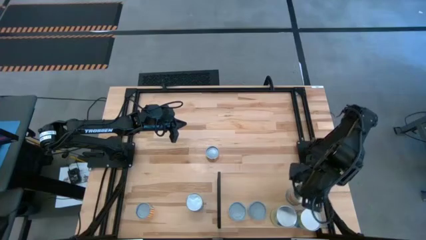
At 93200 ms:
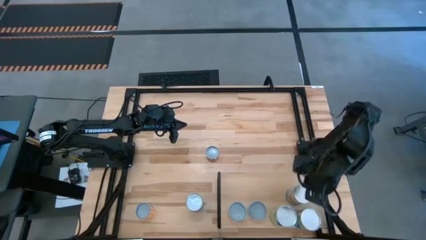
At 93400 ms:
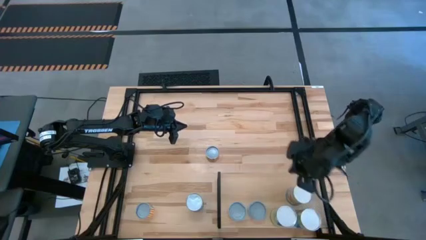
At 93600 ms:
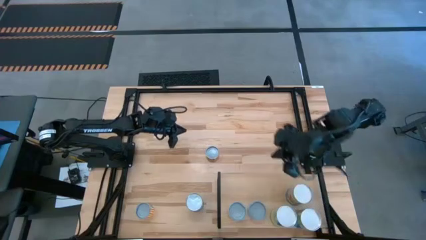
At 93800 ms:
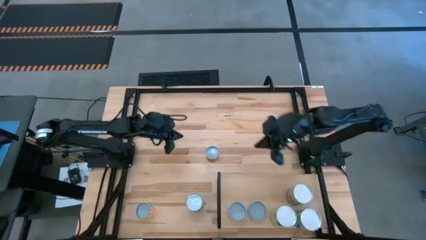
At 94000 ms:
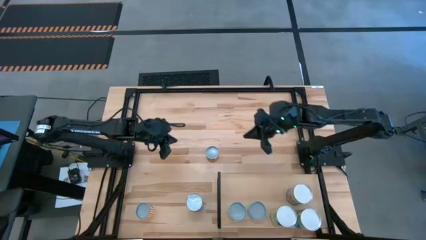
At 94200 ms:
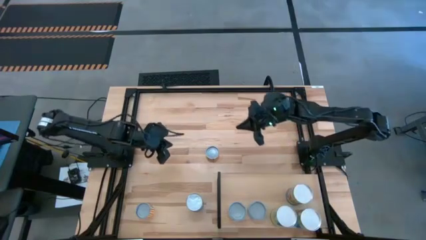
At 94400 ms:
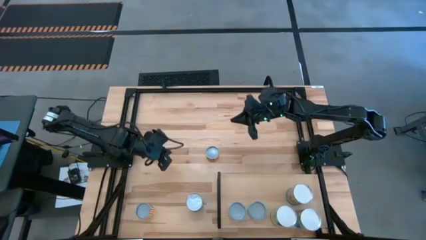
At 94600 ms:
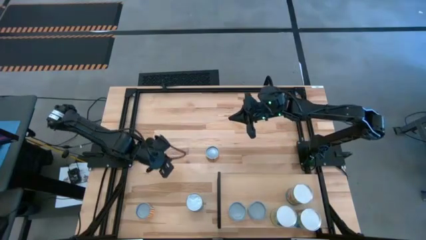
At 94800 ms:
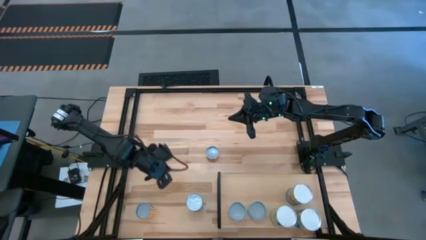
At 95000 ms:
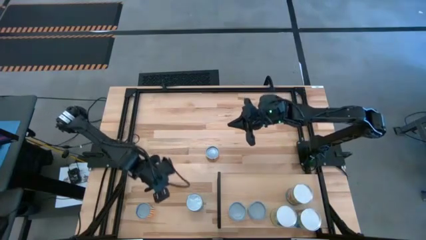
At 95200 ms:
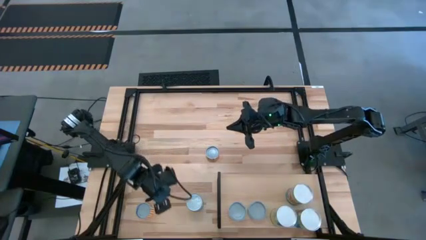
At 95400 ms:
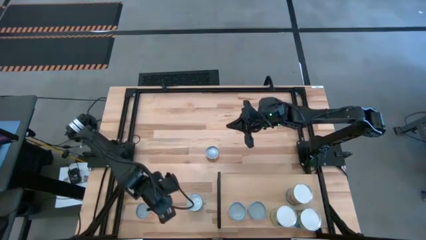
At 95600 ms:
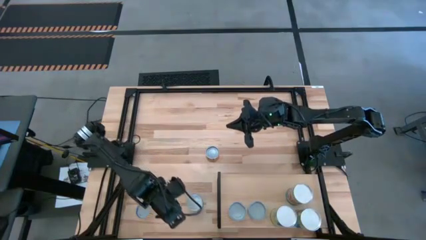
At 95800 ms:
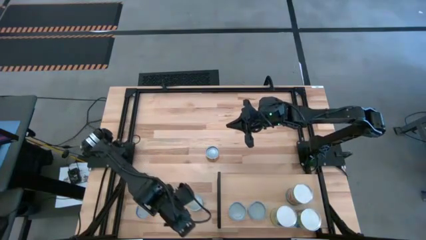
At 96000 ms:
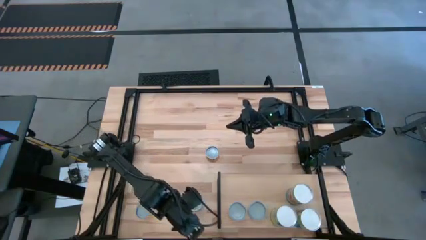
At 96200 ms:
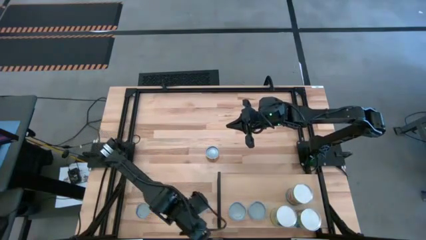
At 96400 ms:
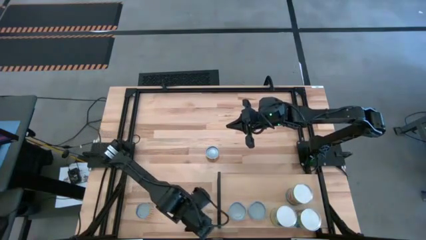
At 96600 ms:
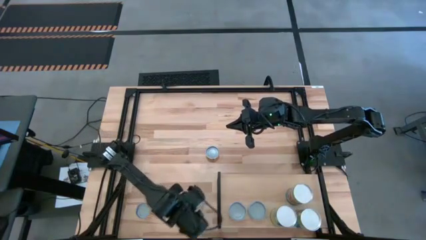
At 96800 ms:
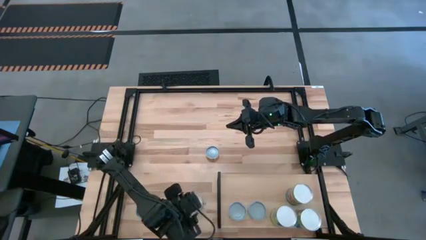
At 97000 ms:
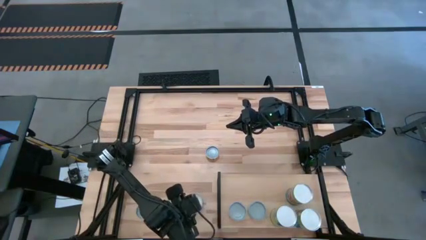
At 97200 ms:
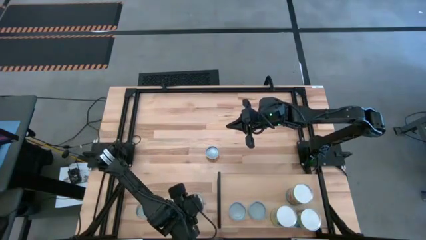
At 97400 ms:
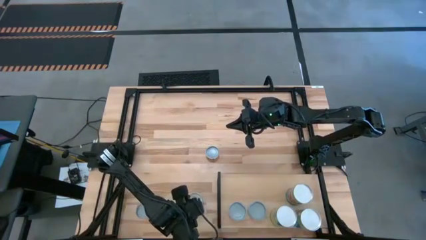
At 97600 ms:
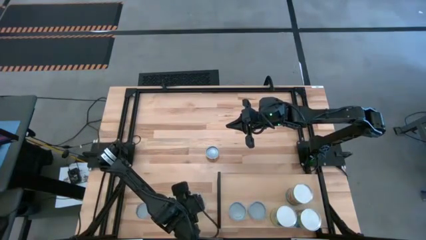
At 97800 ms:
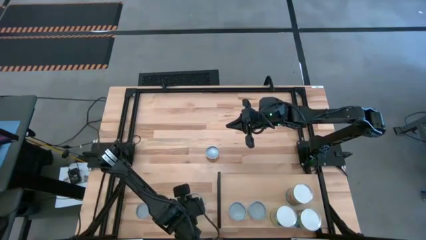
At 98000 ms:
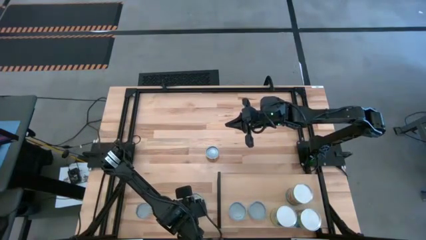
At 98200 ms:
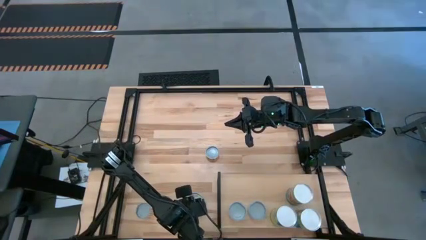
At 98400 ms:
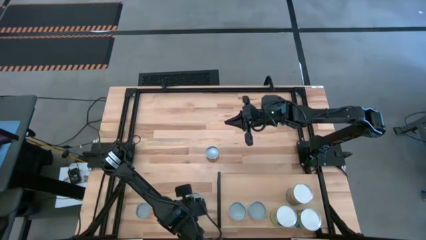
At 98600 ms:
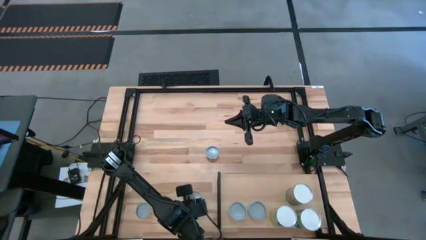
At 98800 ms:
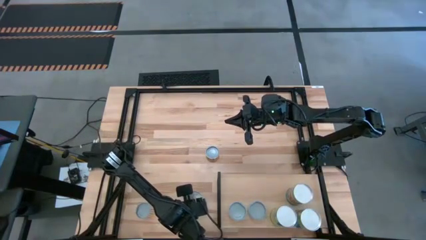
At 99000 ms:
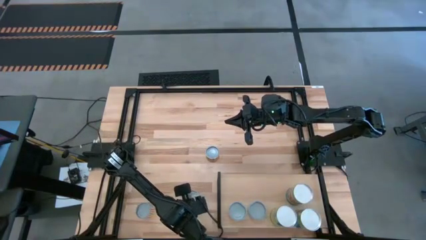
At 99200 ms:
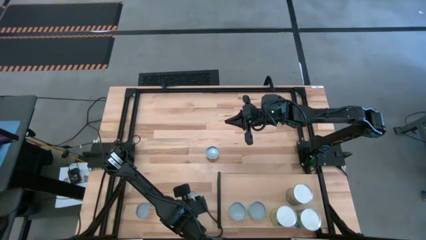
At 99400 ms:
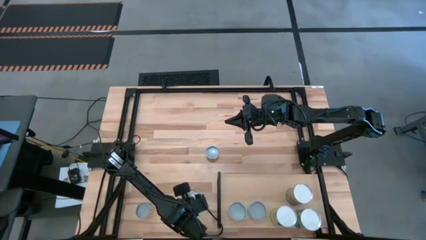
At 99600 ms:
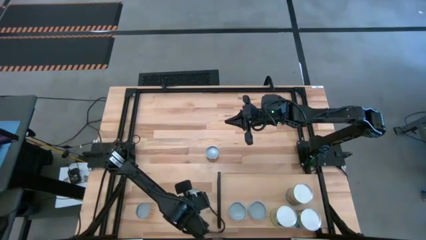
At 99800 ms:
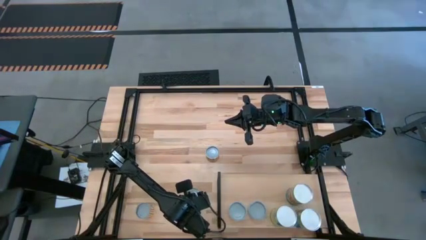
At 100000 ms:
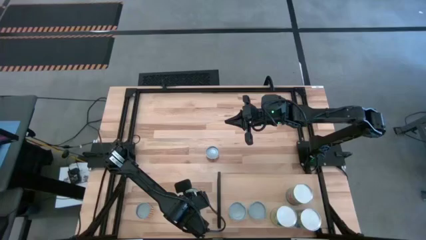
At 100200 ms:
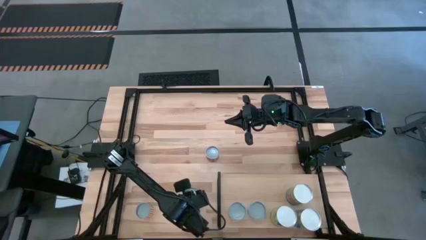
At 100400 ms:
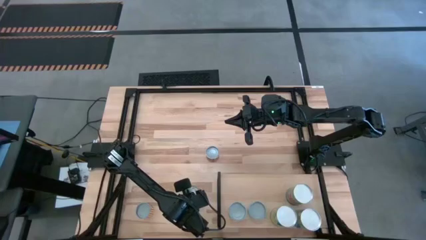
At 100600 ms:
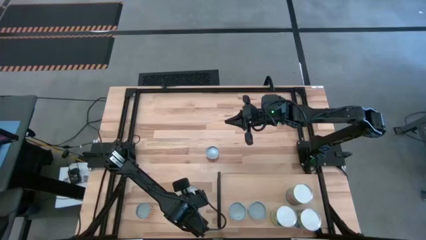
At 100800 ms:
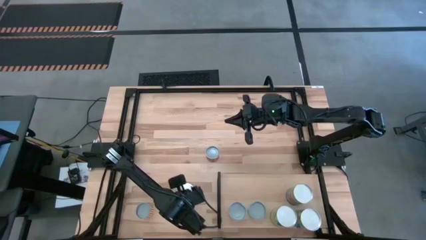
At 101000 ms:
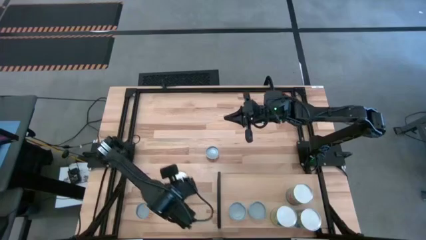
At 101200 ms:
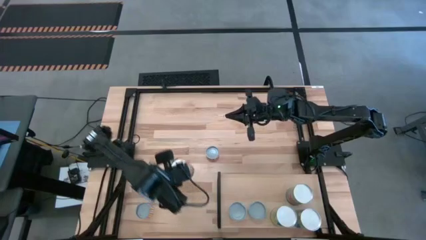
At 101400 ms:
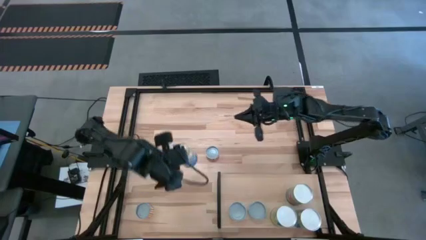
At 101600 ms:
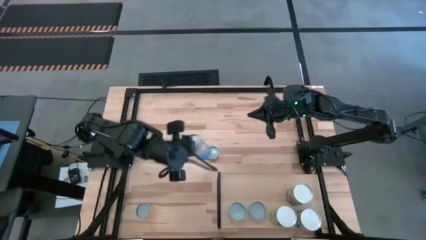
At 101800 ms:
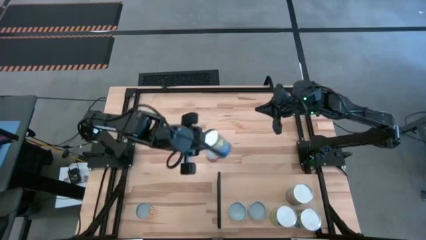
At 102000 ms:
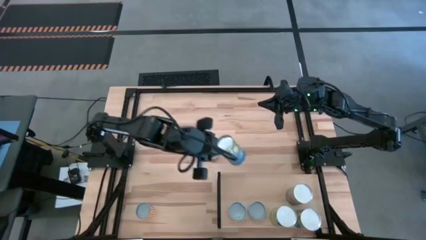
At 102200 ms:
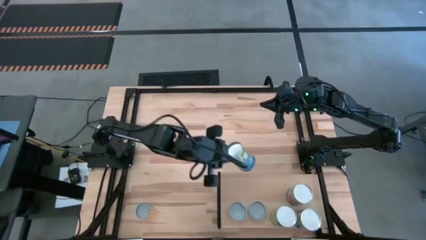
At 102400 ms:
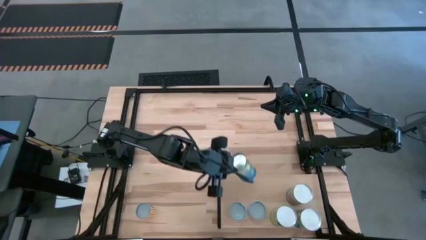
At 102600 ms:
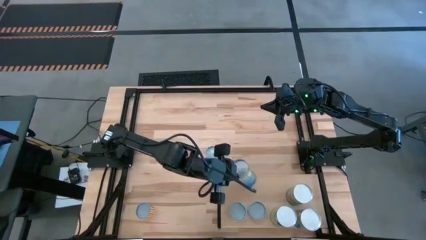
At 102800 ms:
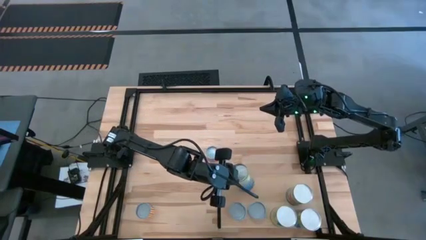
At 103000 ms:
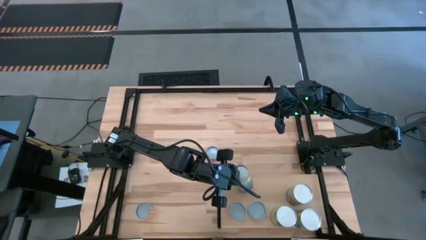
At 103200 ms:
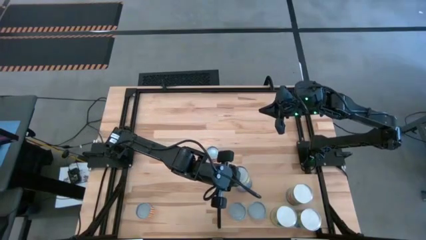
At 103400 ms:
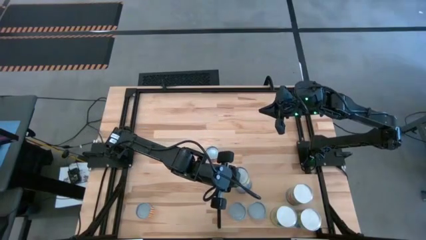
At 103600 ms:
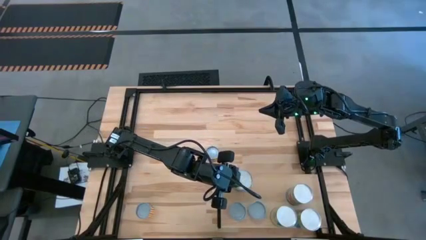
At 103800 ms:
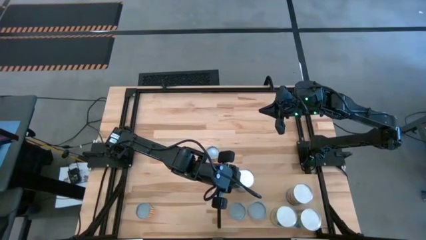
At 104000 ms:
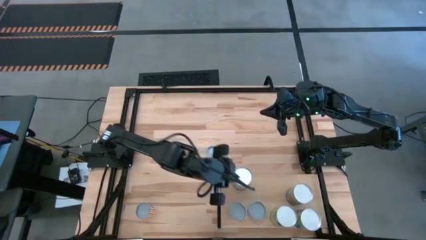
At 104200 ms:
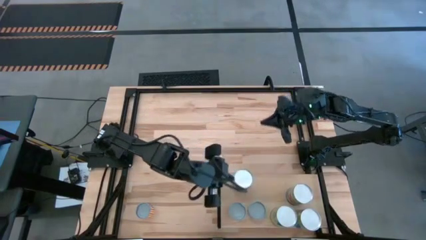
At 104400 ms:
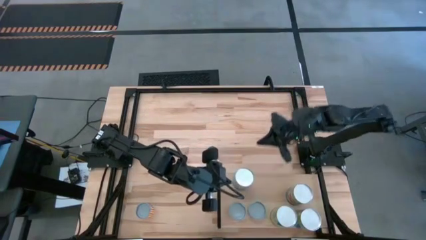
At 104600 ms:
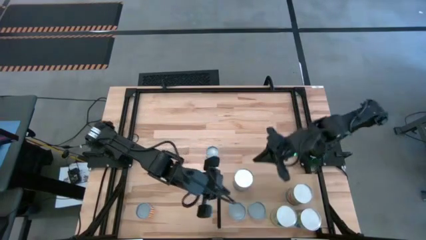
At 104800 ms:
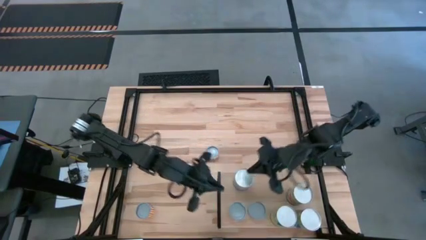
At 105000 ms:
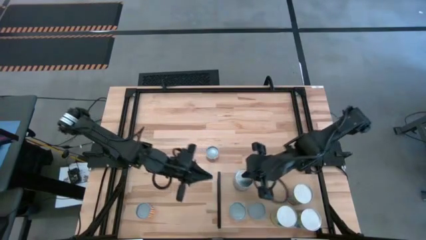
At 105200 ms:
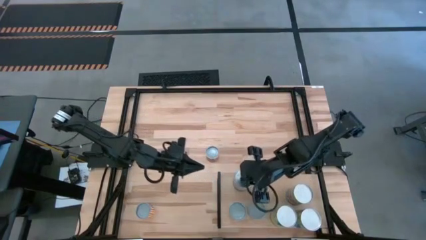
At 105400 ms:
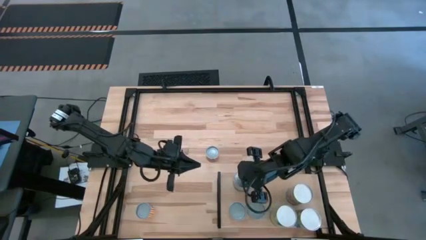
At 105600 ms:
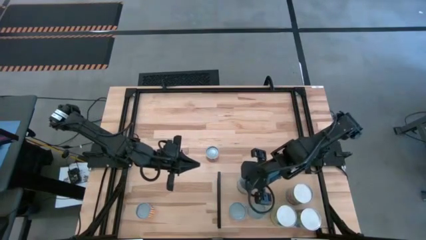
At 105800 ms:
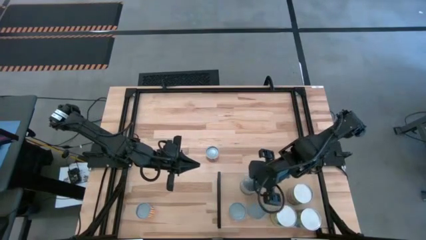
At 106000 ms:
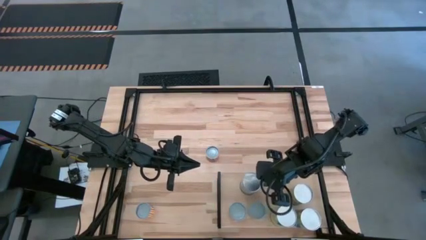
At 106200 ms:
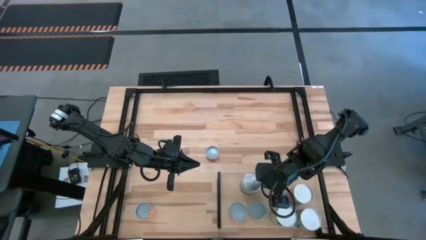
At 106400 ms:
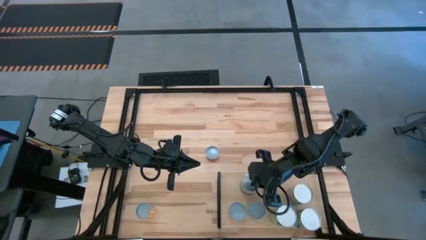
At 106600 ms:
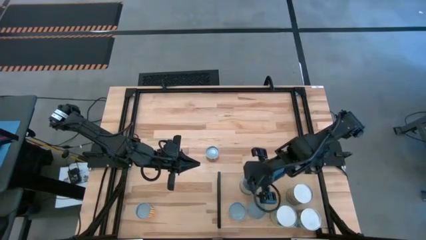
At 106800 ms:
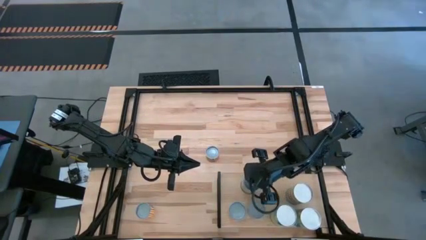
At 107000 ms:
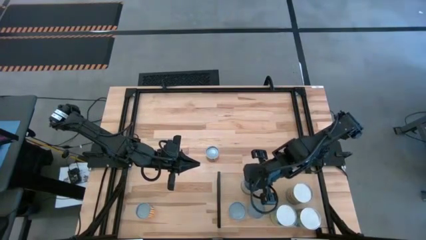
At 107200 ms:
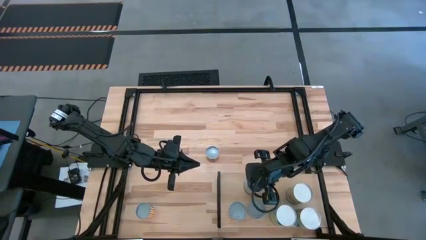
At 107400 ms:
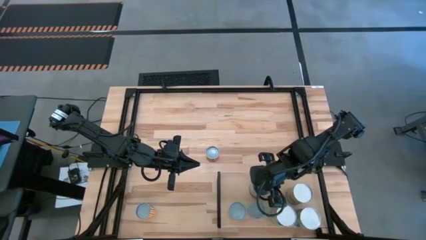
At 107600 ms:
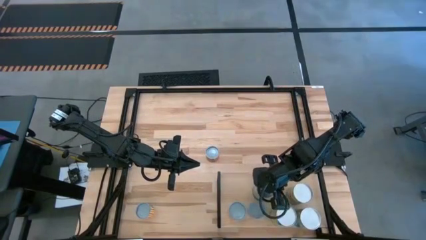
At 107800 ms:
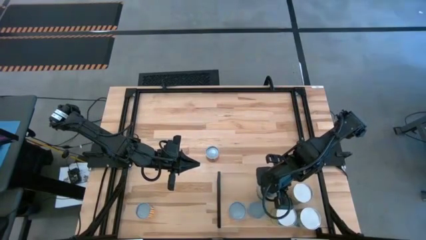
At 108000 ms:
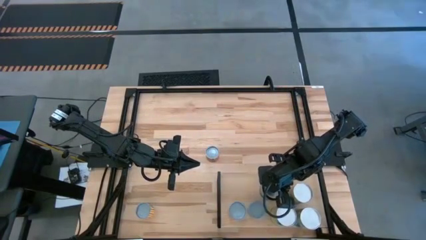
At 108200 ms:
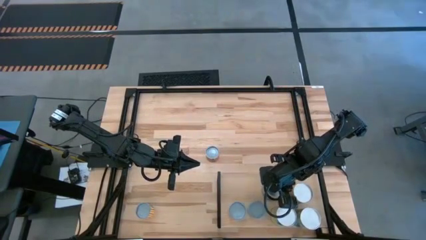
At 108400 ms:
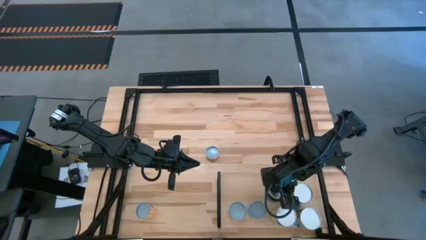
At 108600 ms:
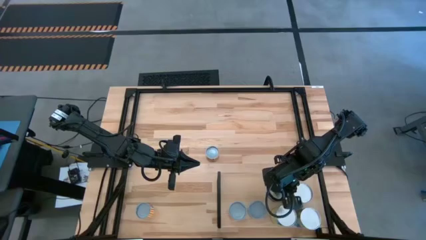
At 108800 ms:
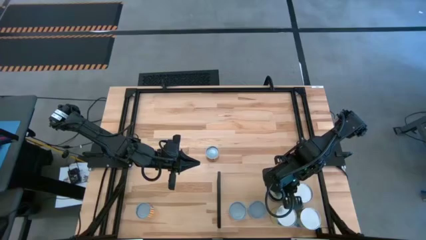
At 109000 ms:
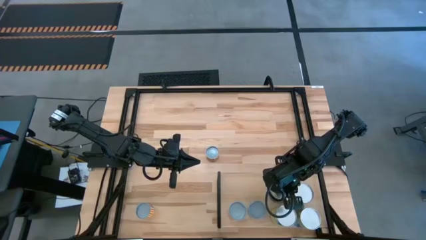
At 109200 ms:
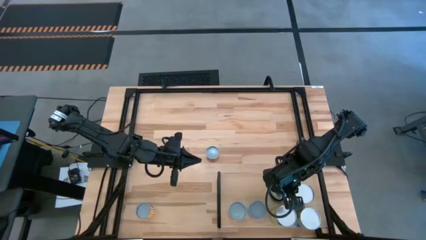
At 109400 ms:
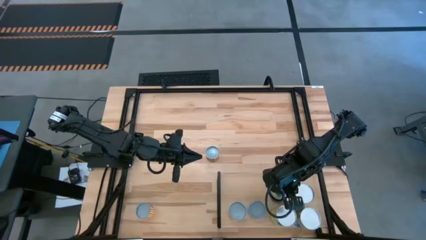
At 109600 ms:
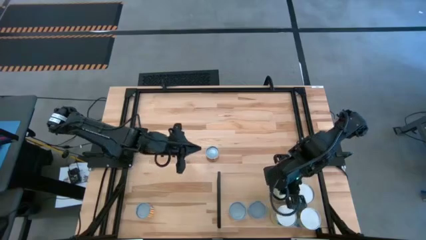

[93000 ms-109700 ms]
Task: Pick and place cans onto a shelf
Put the canned peas on the shelf
